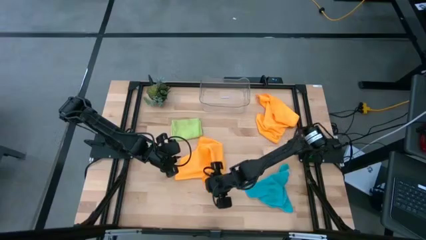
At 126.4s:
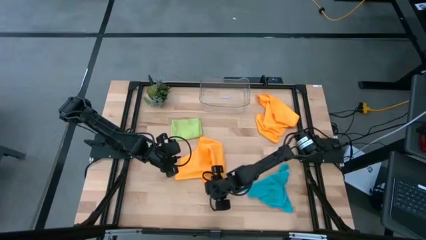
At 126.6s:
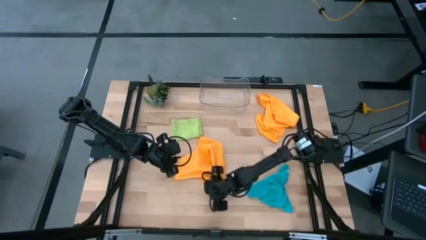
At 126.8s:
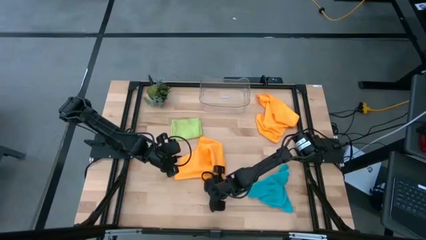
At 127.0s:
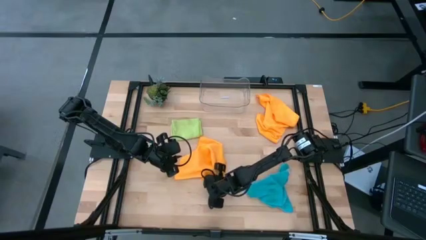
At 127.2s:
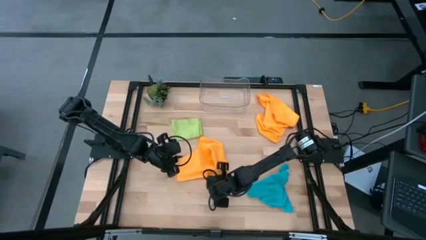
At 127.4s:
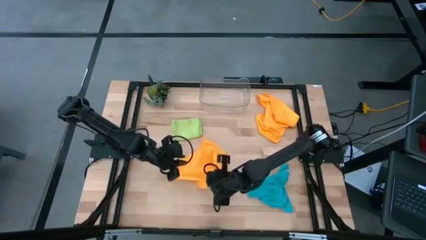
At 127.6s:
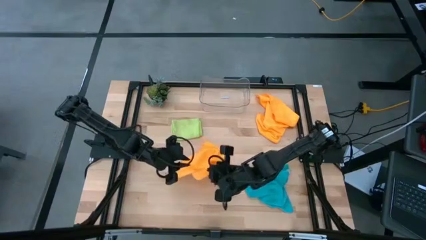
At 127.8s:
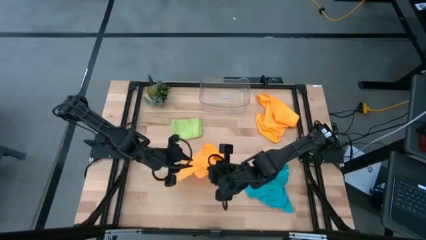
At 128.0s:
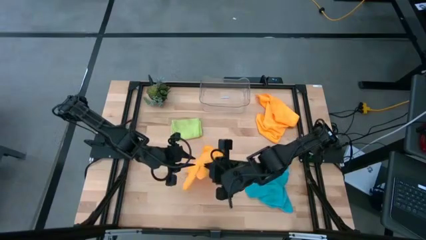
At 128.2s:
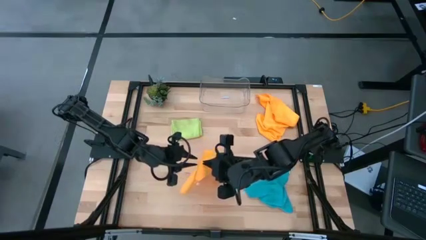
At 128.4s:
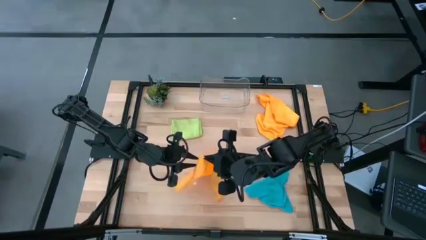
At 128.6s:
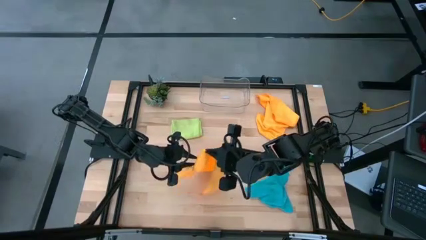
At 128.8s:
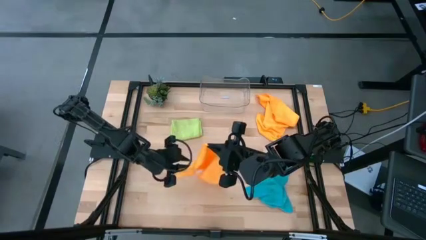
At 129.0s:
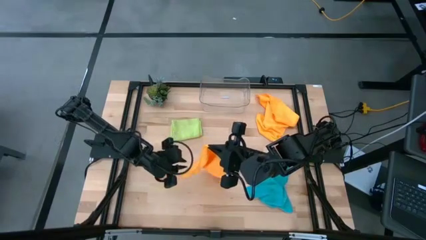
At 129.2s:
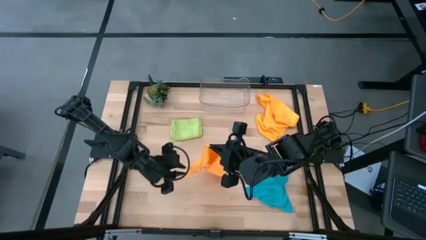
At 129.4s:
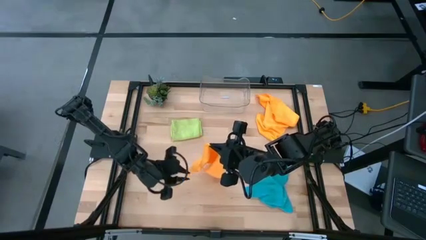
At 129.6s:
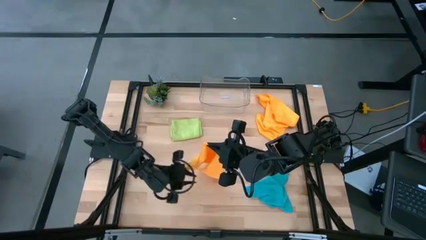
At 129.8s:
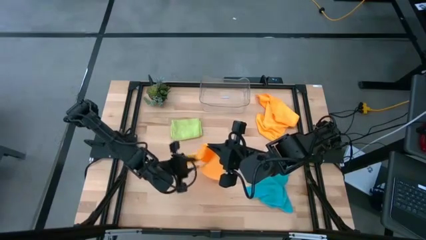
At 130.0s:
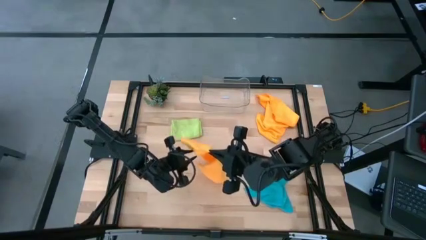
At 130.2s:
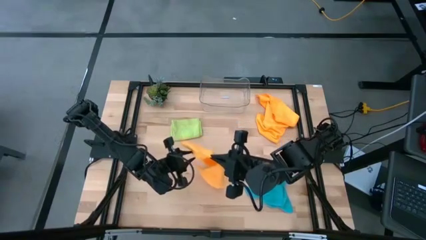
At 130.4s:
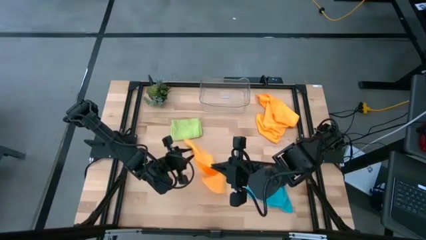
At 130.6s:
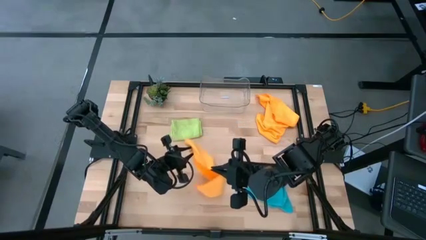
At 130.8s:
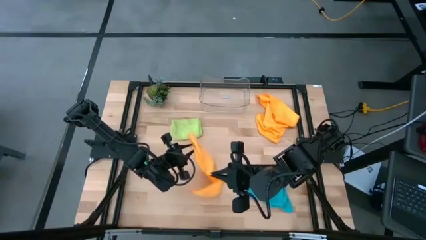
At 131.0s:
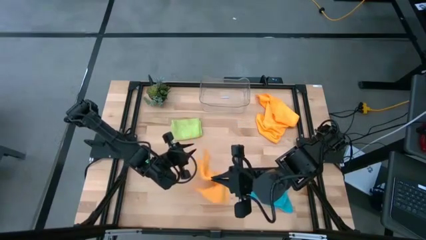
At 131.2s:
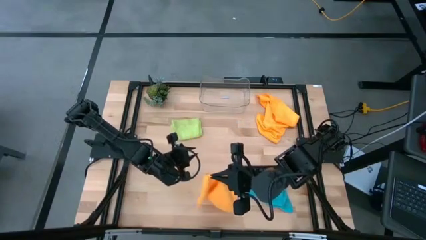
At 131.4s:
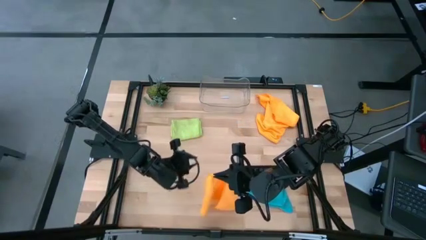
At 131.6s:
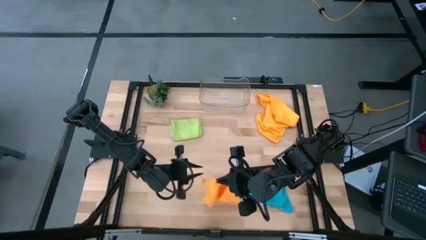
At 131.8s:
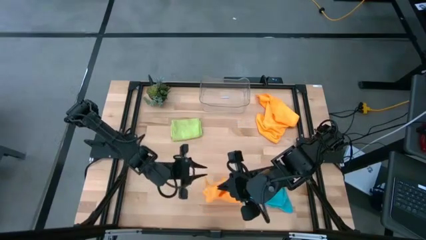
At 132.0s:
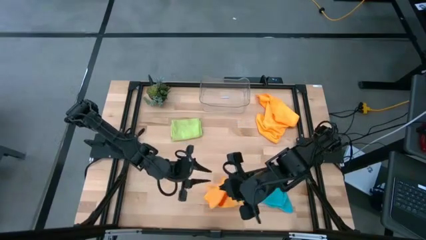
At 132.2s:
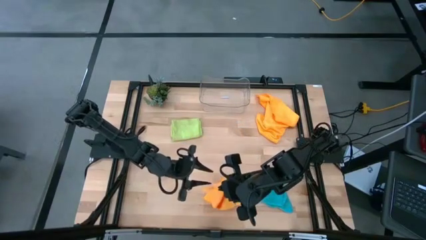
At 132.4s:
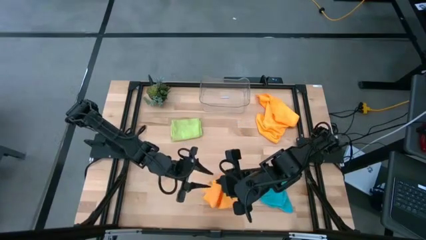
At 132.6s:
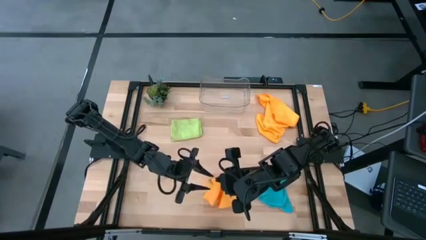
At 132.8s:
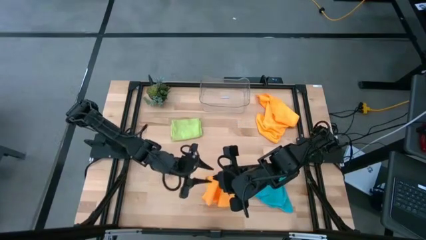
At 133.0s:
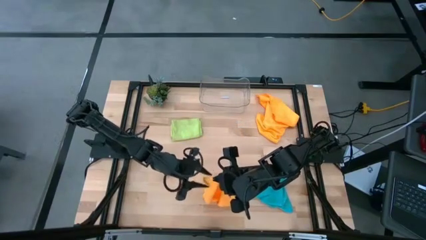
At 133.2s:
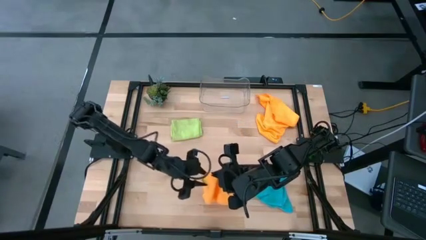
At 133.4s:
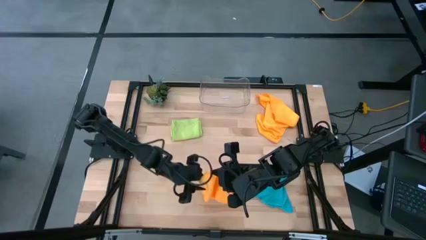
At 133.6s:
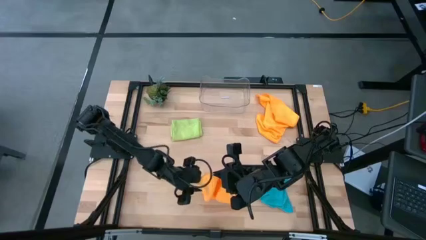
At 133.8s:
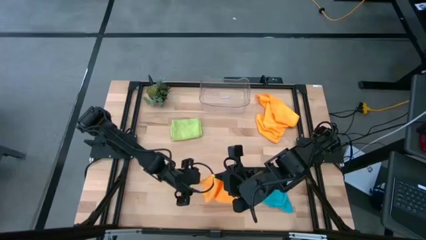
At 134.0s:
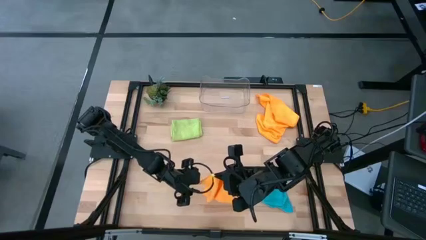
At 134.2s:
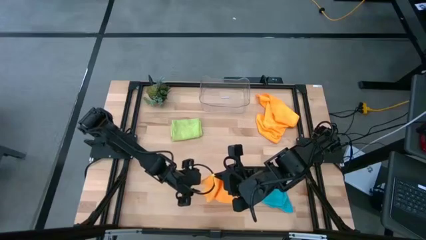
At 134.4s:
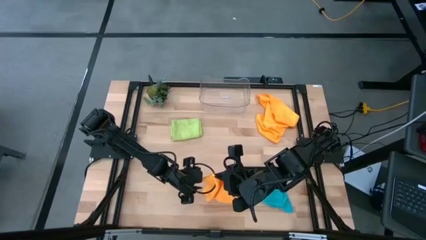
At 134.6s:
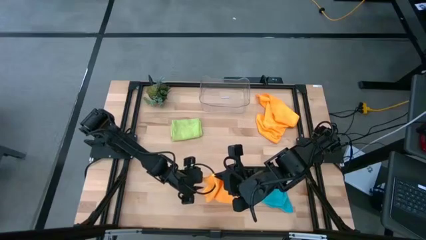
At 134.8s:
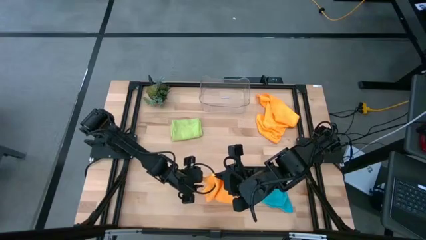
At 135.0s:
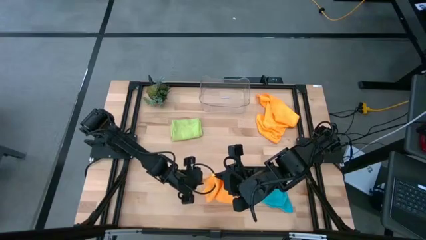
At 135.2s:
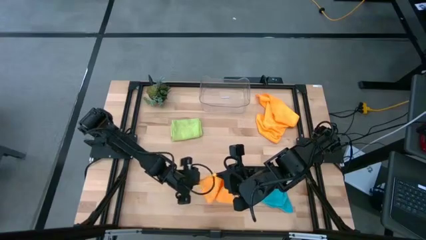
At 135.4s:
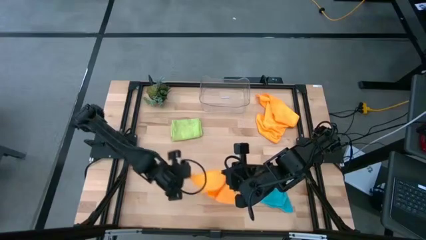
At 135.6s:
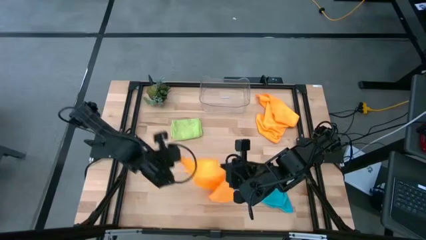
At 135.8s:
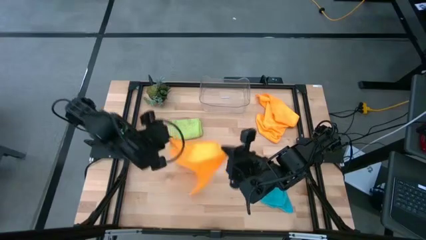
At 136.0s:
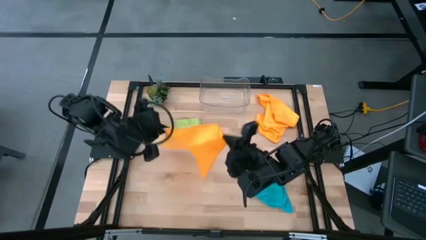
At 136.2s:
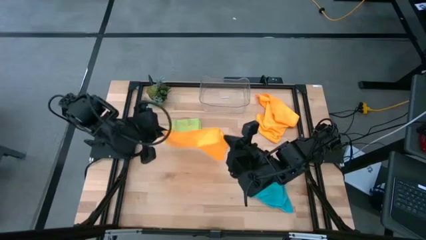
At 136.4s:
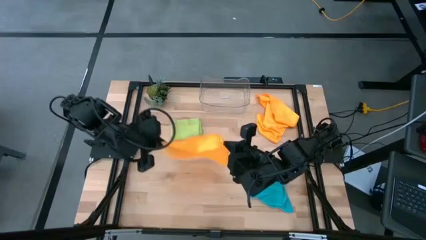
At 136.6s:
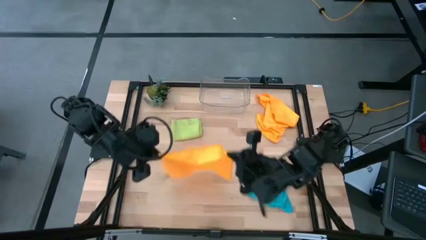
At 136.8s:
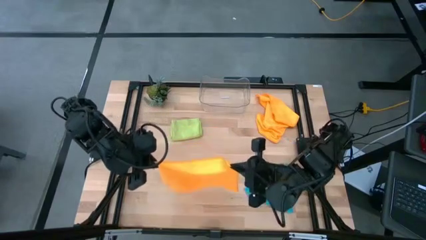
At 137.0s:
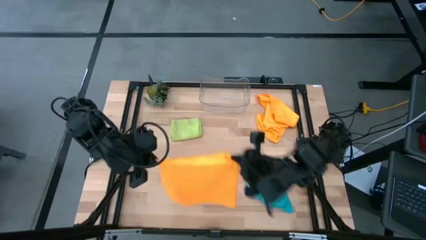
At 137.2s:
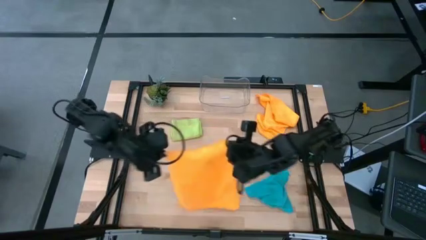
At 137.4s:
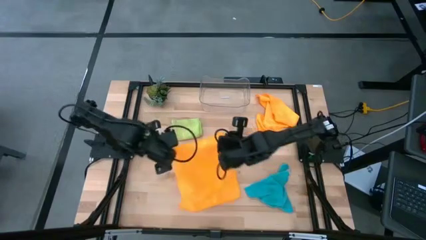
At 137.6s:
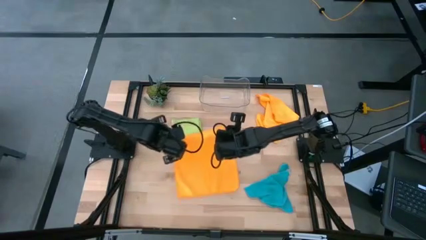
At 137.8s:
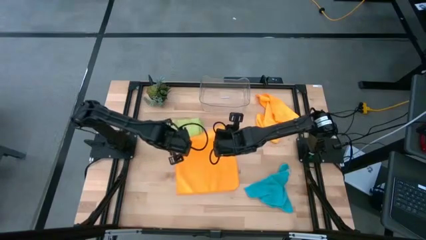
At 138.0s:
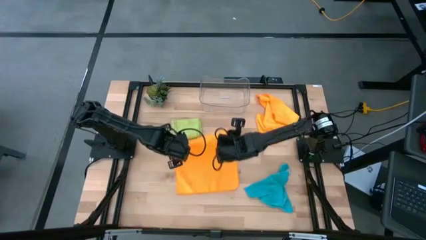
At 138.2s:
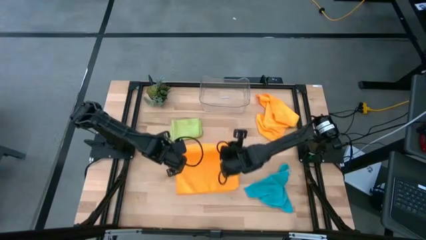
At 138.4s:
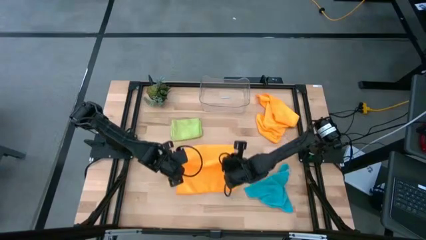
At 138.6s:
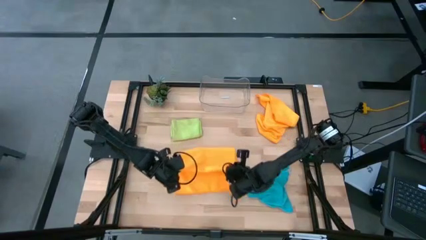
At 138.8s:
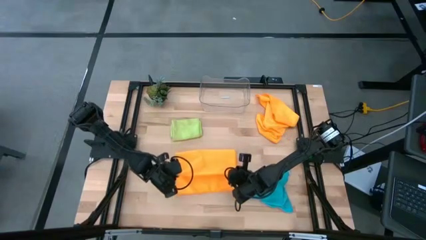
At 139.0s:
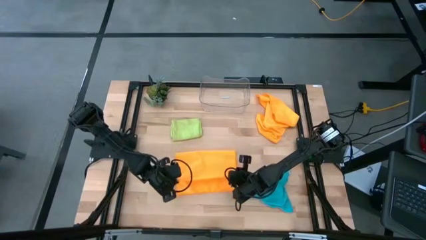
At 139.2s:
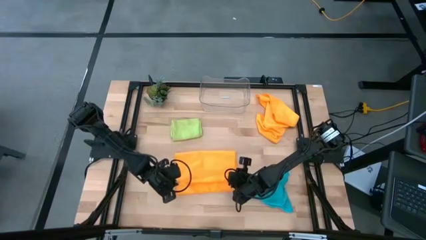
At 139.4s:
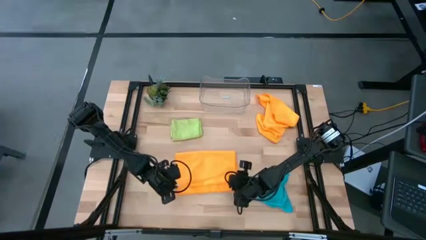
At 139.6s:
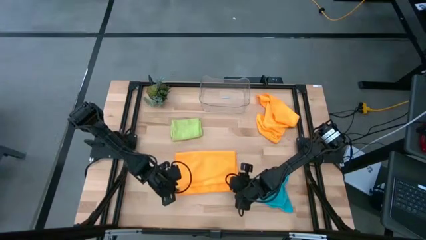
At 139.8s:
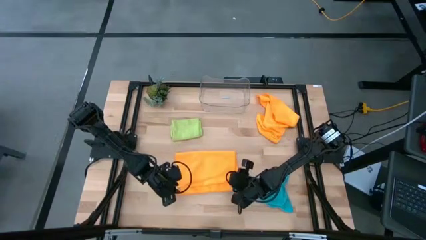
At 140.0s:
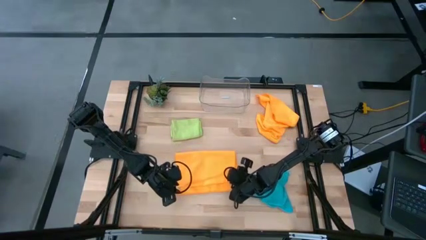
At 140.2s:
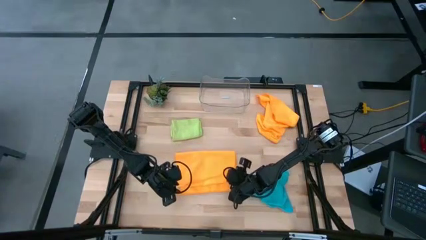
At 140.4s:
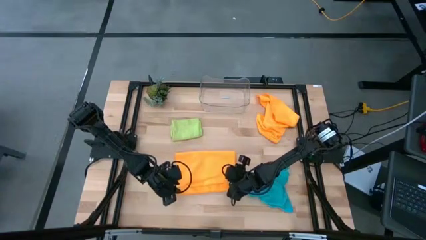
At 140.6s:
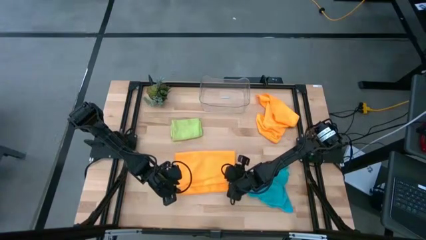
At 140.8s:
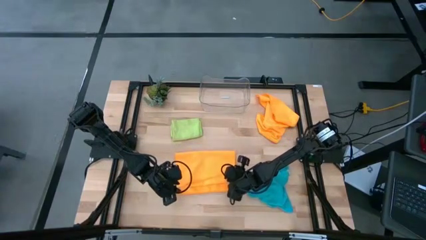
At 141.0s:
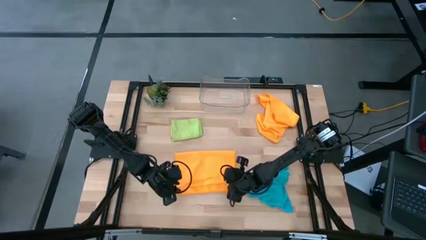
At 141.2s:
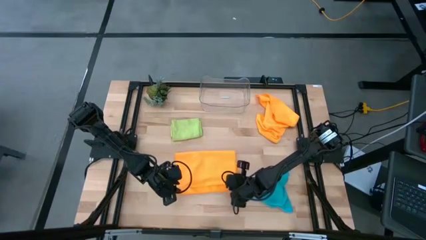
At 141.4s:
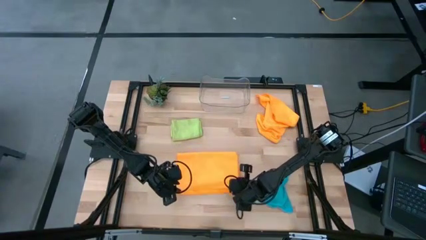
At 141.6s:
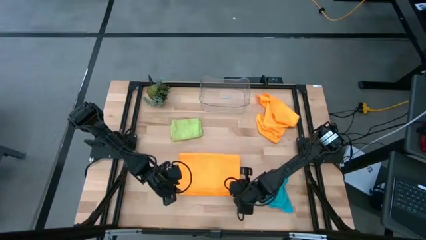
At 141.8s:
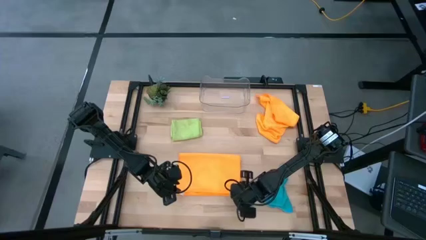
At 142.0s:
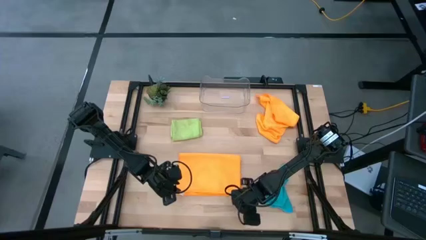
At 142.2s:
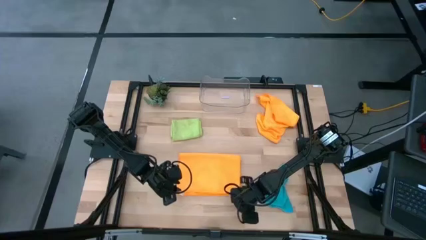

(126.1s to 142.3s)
Task: Fold microfiber towels
Fold the bottom microfiber cloth

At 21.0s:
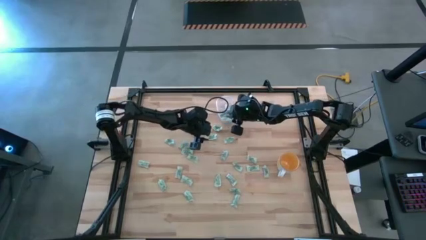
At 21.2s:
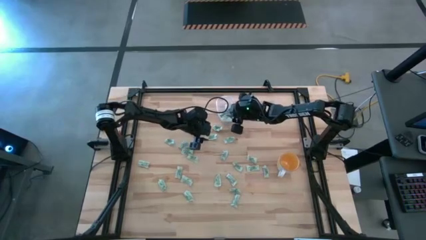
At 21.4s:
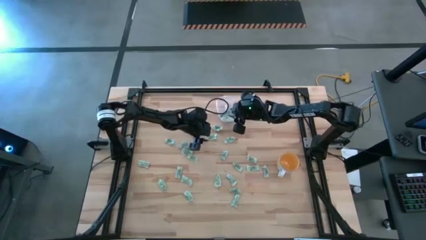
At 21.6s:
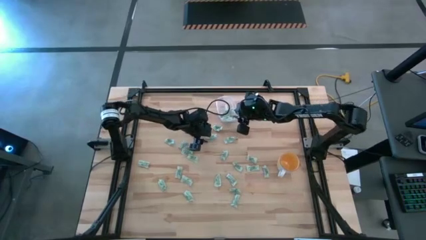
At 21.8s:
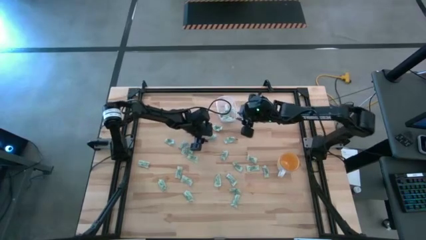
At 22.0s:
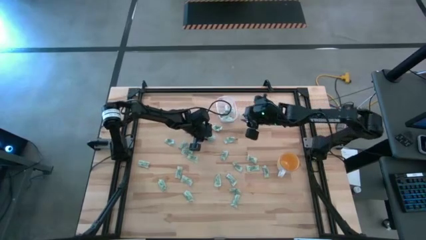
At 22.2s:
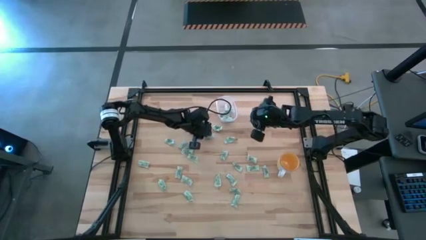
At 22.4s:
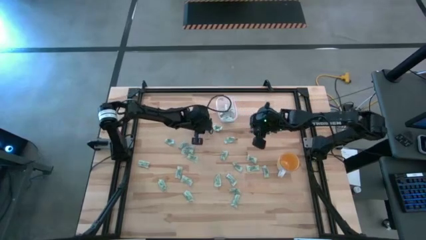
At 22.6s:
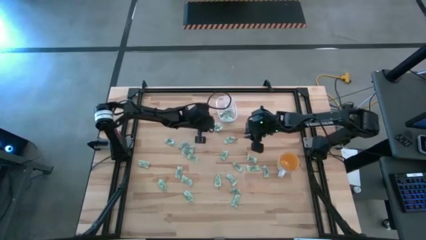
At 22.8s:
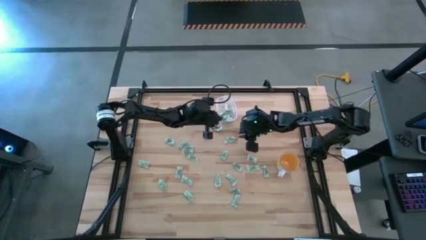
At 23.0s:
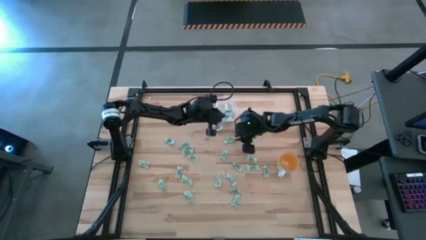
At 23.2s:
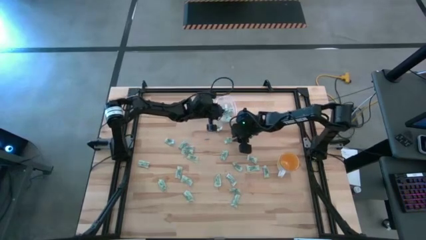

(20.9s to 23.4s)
Task: Pick and place Stevia / Truvia into bins
Put the green stevia packet into the transparent bin
